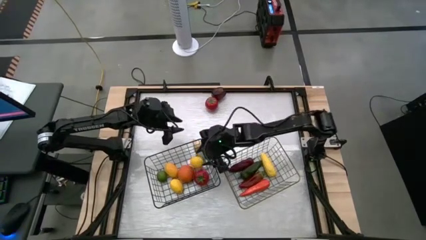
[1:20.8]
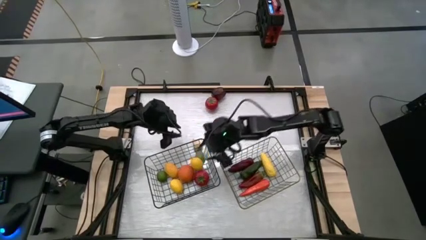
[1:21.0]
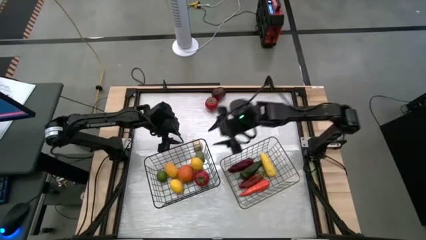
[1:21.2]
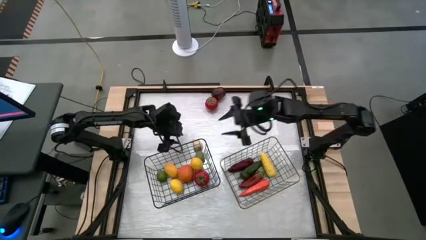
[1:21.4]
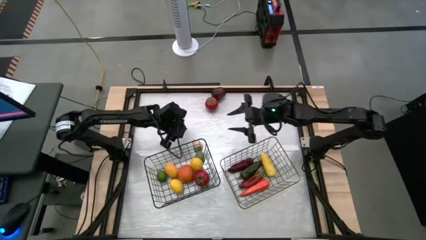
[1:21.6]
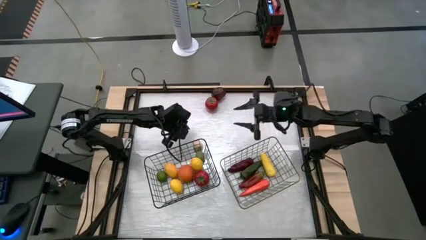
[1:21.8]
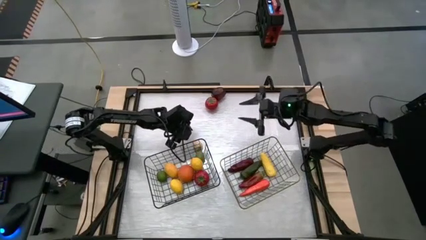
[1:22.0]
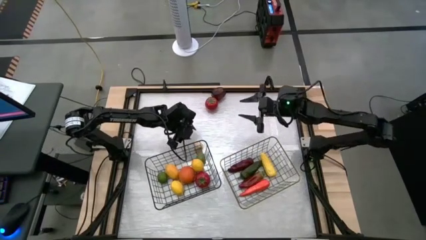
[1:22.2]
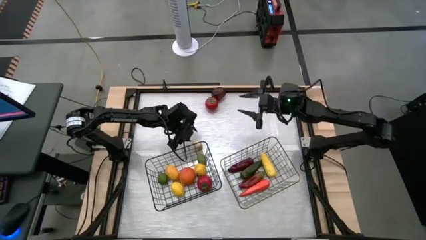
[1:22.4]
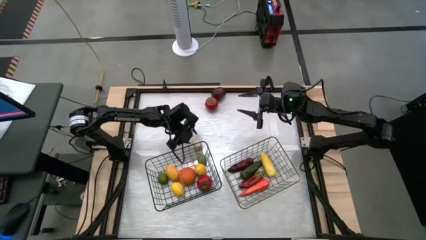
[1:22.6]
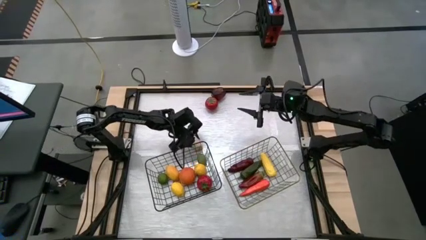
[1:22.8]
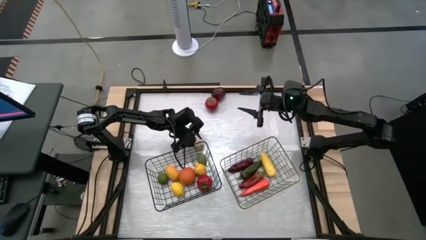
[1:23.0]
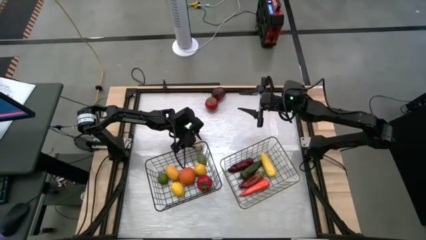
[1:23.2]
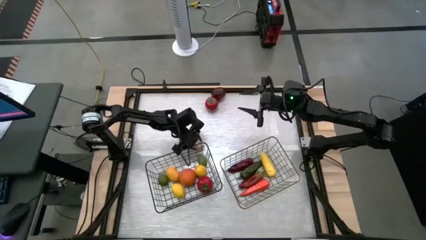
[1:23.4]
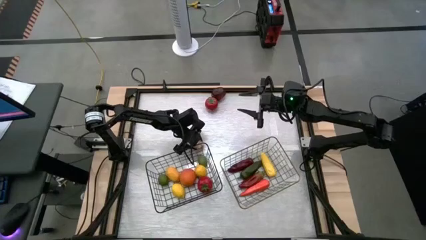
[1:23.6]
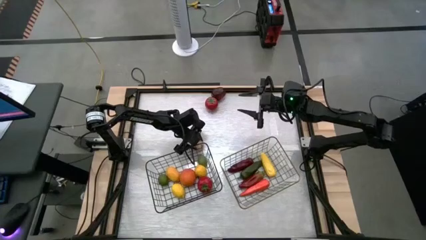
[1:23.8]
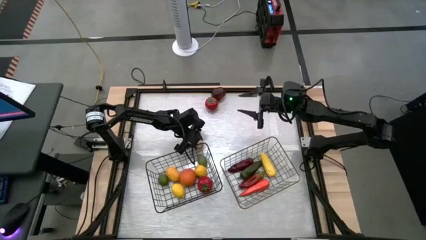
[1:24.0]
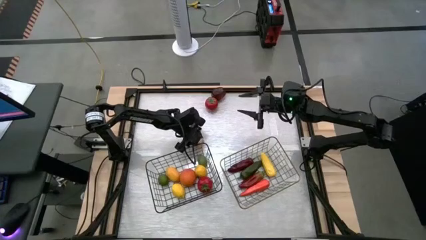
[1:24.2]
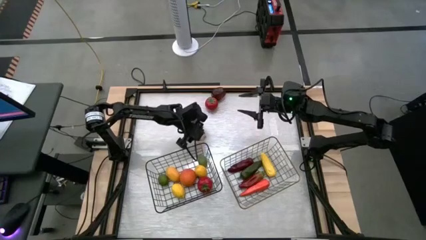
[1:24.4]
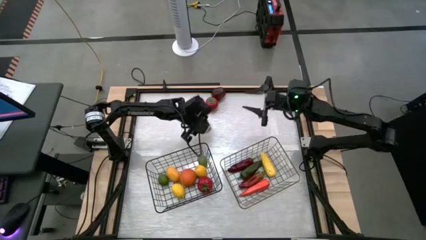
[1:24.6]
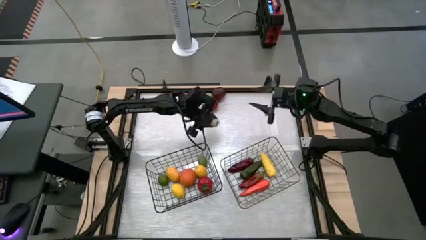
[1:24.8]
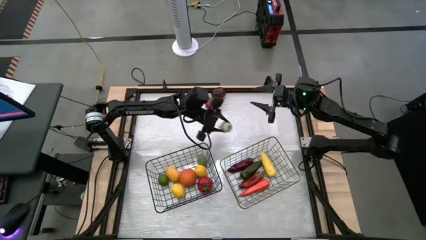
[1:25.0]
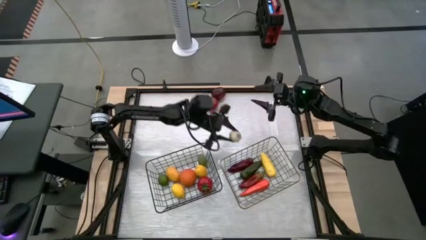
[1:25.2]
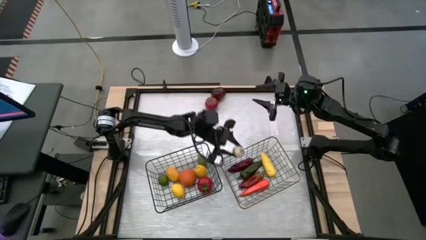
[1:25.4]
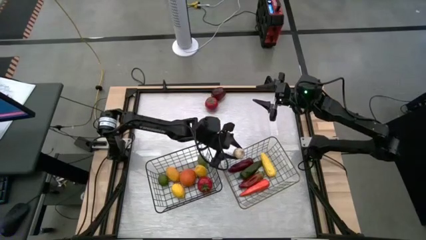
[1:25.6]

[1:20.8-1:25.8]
Task: Sort produce into baskets
Put the white garlic into the gold wire basket

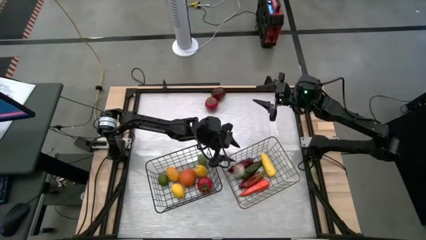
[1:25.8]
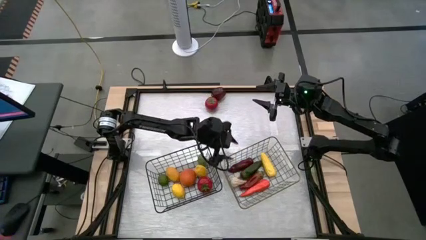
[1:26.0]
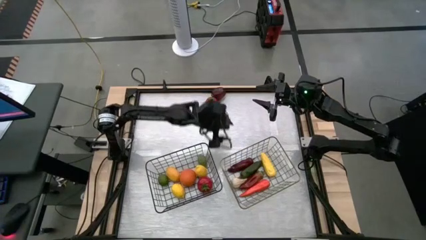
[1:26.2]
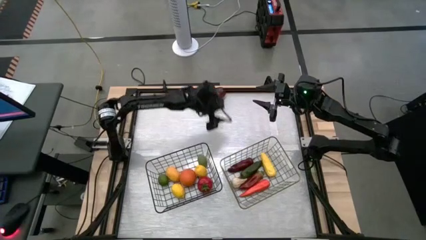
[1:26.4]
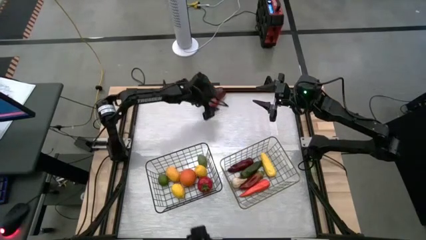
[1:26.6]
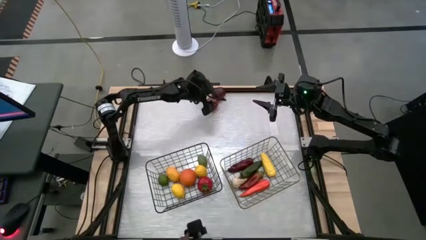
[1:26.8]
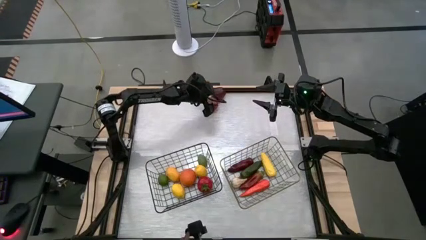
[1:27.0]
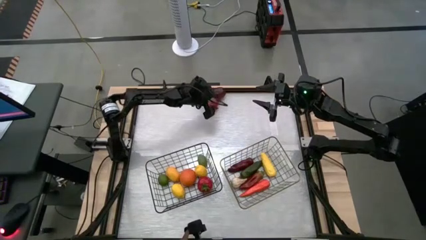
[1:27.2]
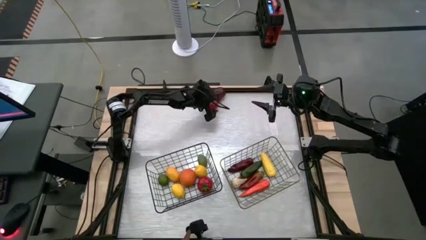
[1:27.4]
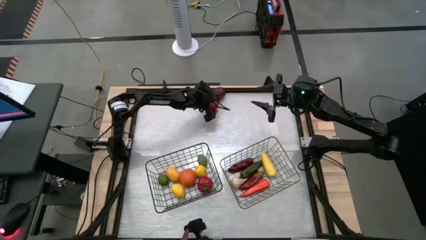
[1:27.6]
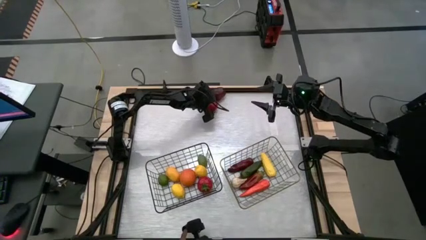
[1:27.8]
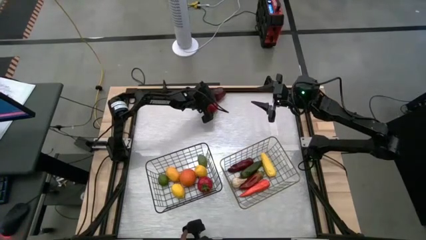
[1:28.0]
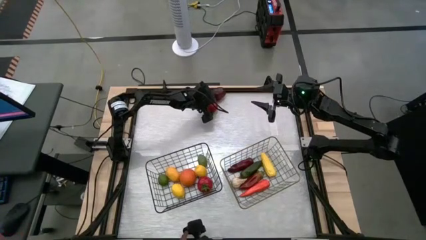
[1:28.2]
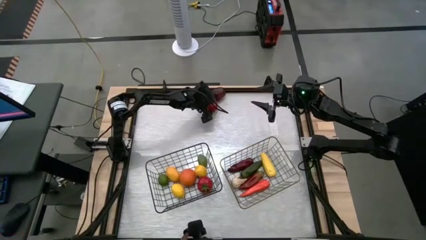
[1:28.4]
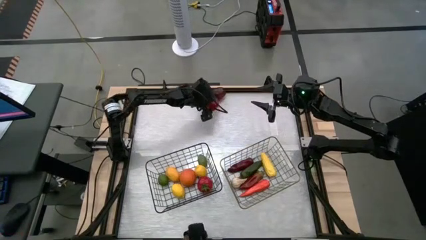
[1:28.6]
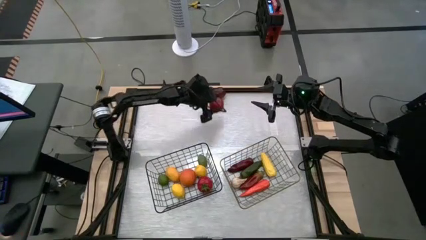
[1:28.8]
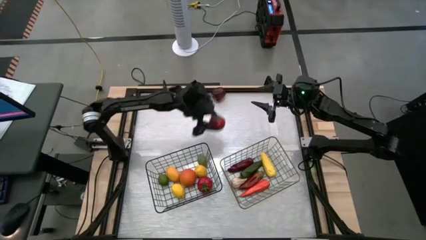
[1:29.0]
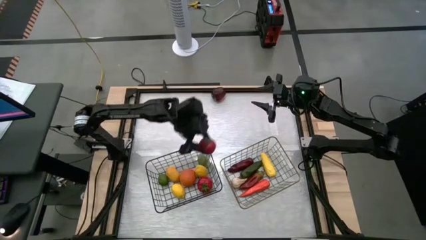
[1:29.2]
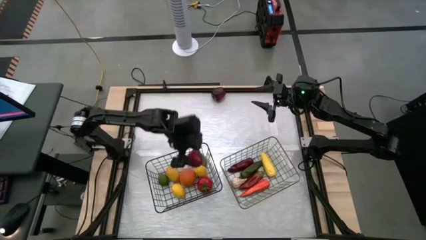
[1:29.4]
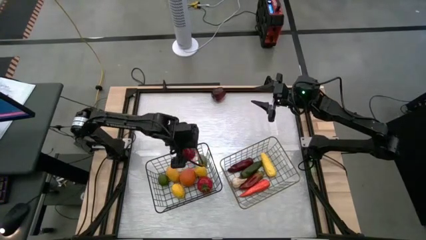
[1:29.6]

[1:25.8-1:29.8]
Put the red tomato into the black wire basket

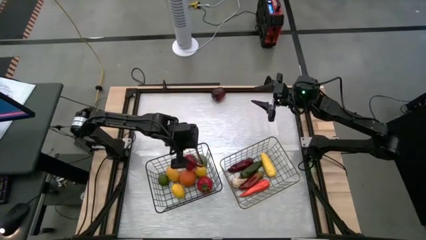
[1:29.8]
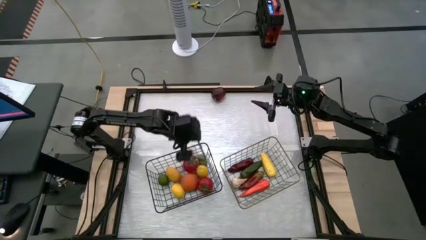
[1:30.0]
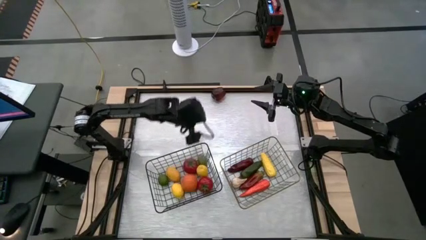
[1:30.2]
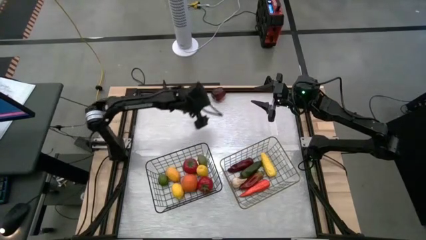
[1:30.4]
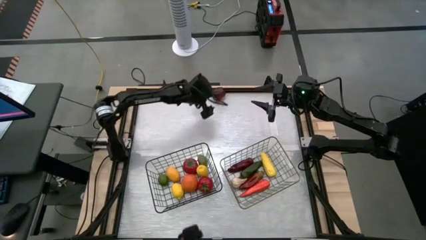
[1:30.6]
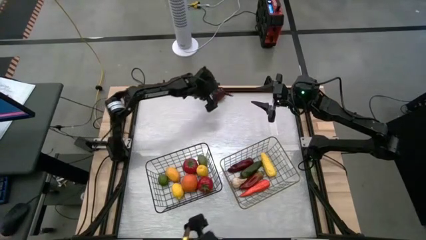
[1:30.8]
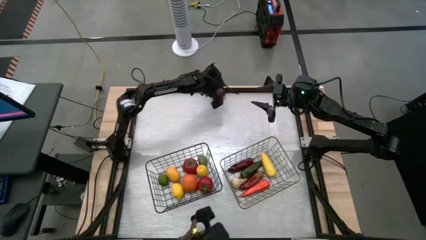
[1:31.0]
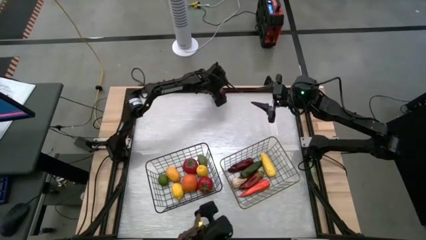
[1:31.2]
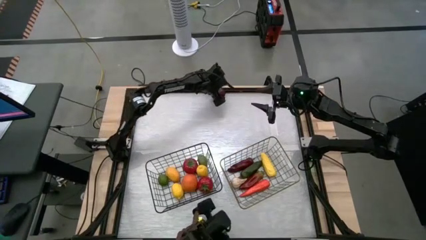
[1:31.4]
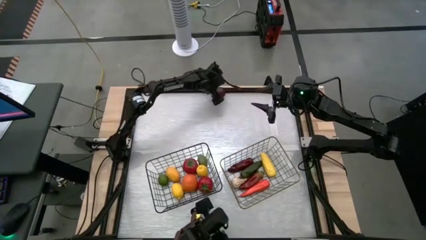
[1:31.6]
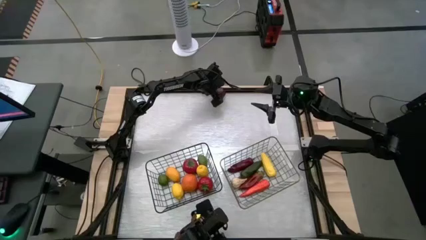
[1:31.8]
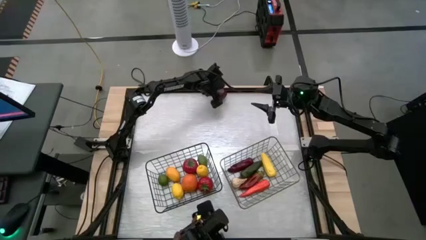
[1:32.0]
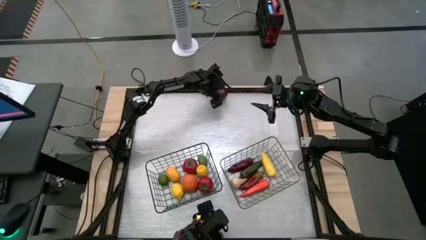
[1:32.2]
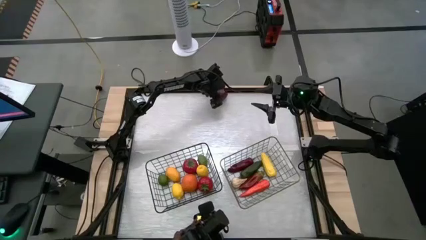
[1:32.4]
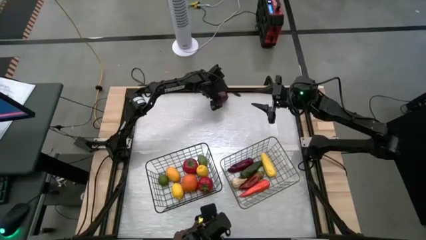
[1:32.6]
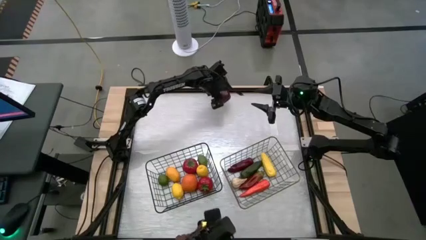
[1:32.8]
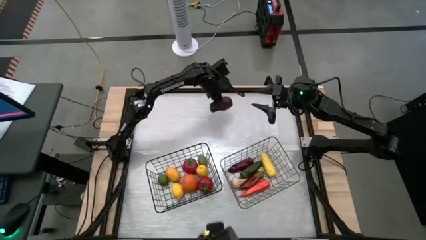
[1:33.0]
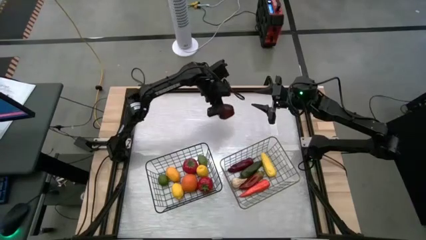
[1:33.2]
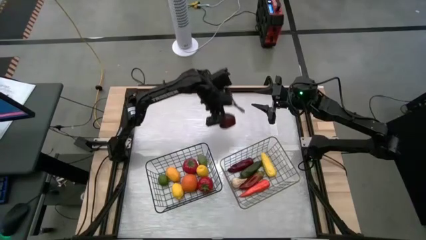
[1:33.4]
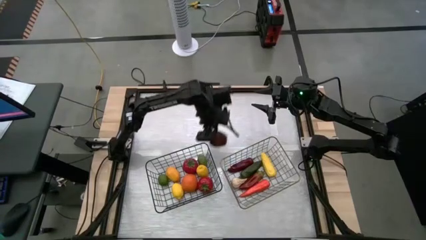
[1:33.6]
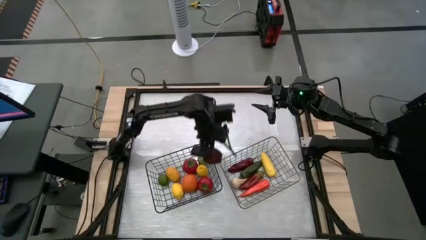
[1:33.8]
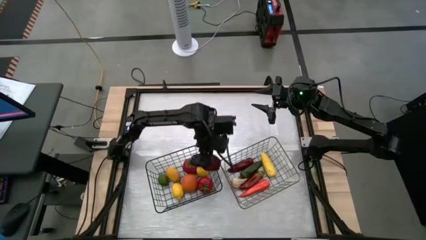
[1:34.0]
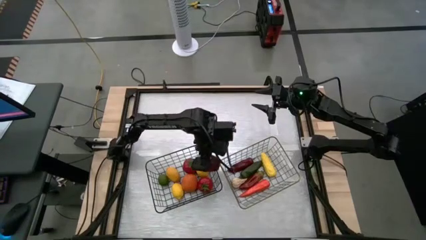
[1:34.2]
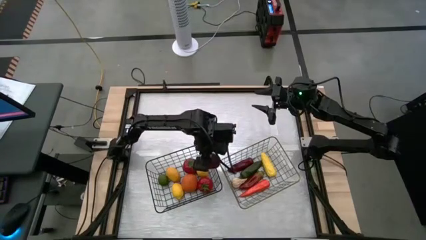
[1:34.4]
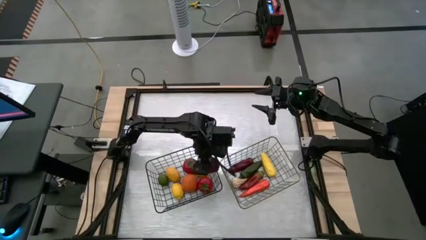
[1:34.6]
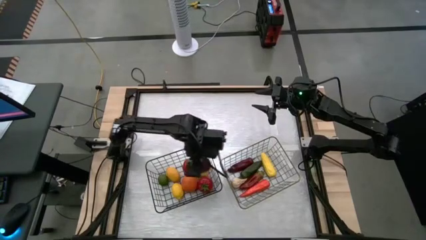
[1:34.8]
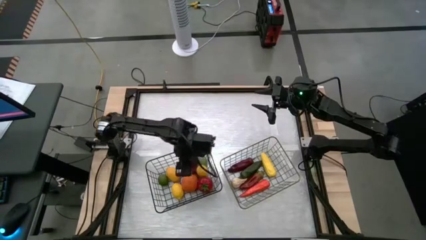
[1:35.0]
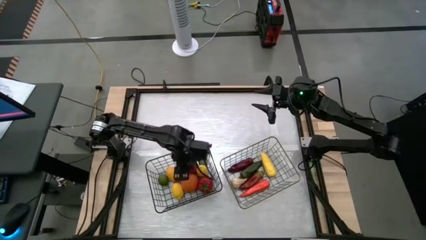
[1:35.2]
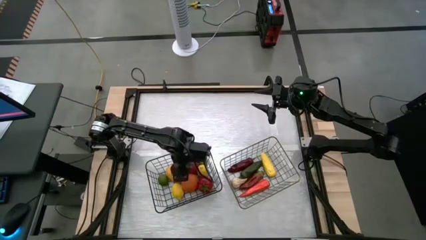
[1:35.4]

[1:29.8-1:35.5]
Put the red apple into the black wire basket

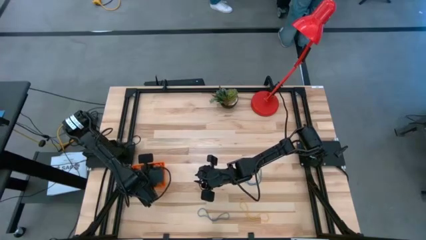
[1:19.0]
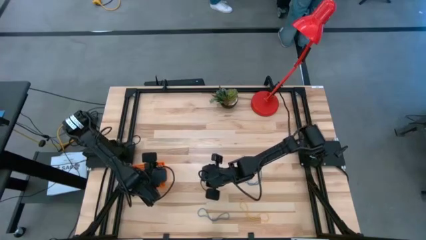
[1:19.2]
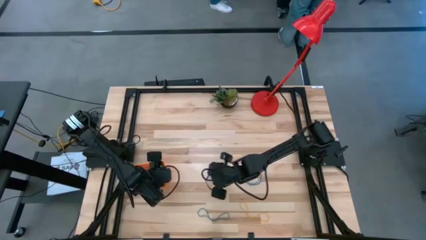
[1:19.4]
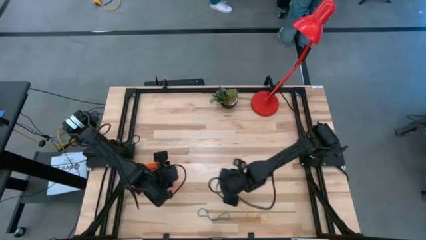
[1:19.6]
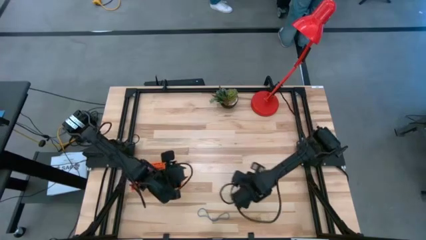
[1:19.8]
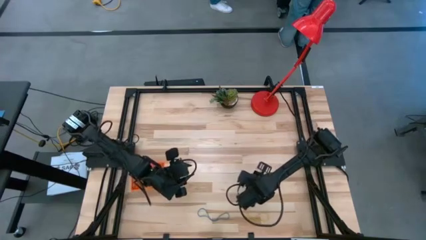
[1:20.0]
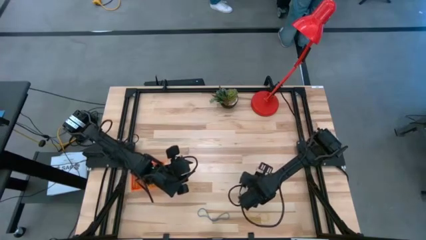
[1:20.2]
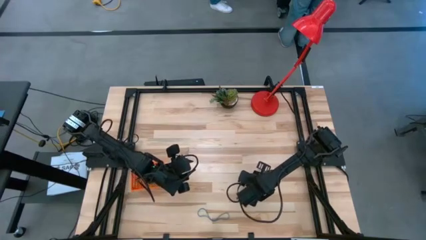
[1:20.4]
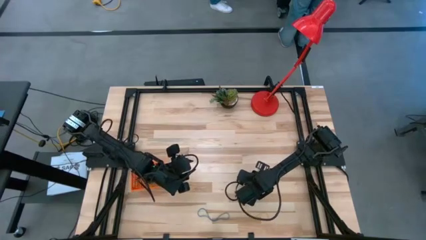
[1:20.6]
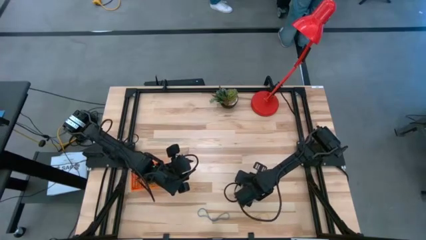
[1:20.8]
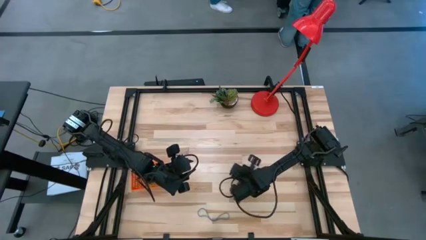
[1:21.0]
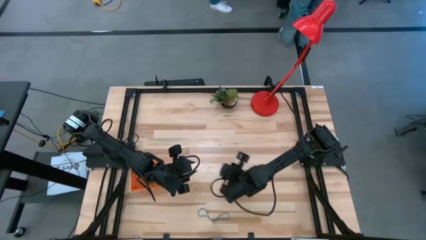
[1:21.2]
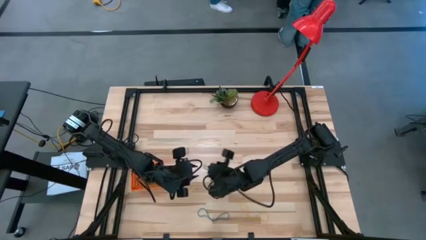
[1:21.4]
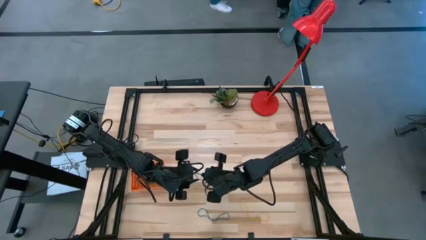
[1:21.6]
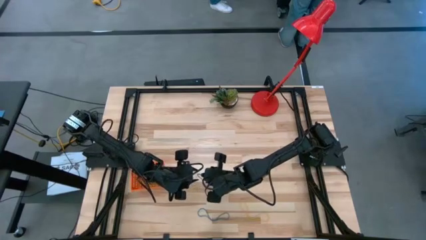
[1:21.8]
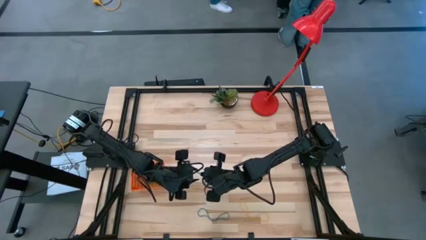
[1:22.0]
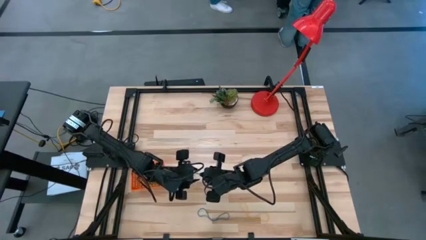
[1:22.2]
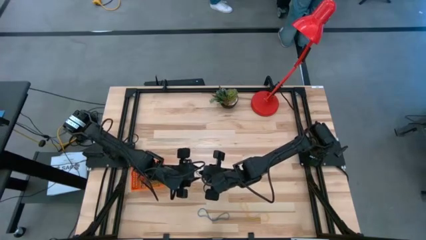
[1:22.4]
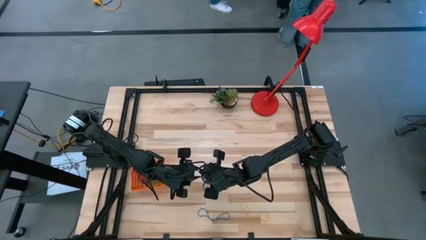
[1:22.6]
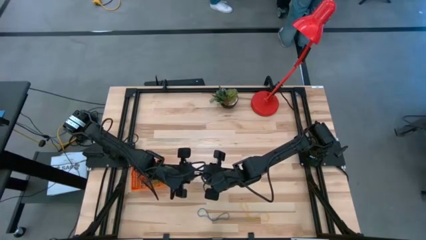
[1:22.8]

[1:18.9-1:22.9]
Task: Pick and place rubber bands into bin
Put the blue rubber band into the orange basket
